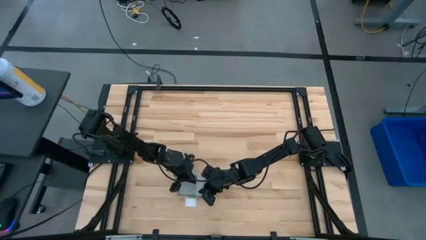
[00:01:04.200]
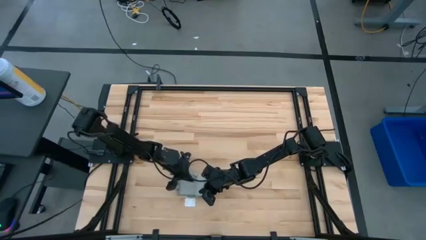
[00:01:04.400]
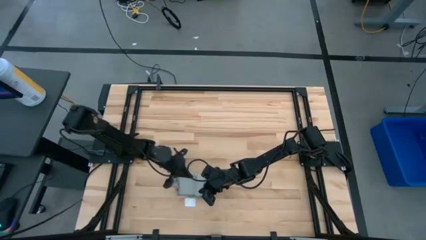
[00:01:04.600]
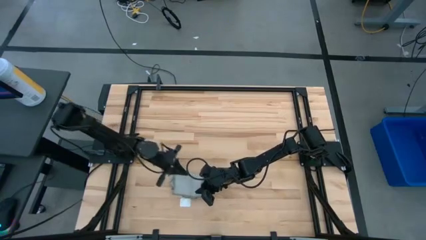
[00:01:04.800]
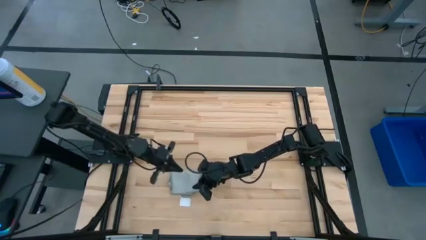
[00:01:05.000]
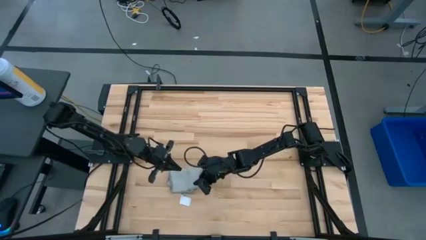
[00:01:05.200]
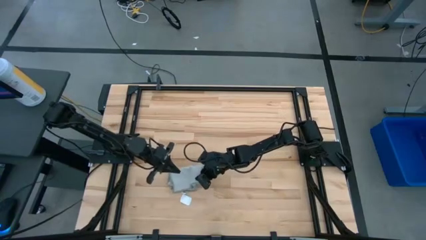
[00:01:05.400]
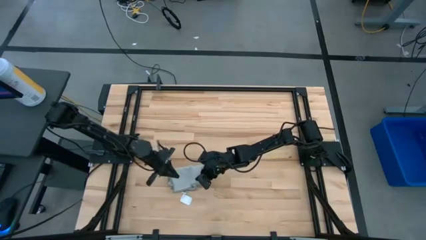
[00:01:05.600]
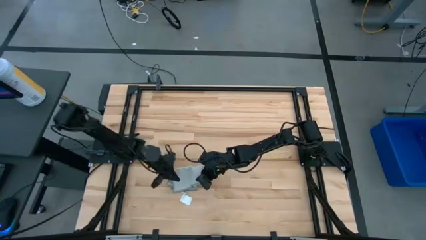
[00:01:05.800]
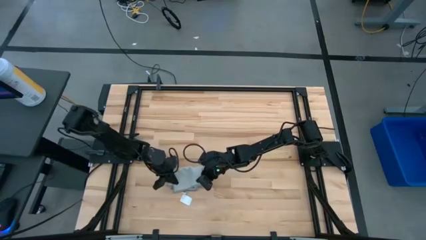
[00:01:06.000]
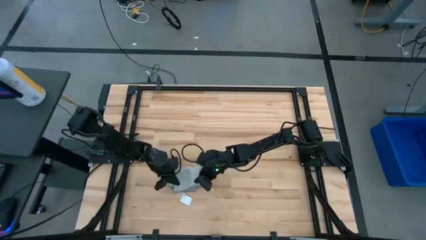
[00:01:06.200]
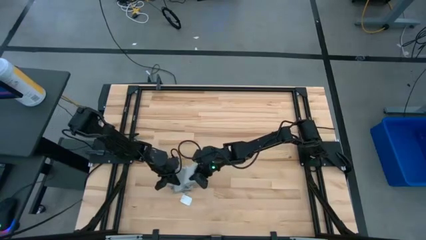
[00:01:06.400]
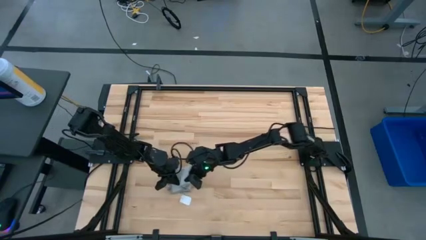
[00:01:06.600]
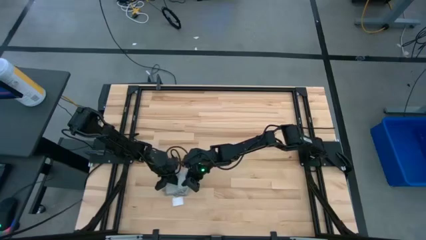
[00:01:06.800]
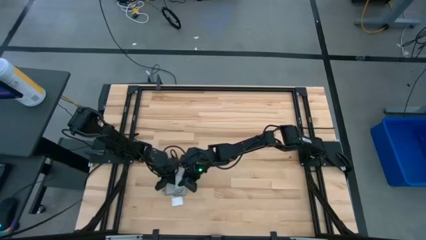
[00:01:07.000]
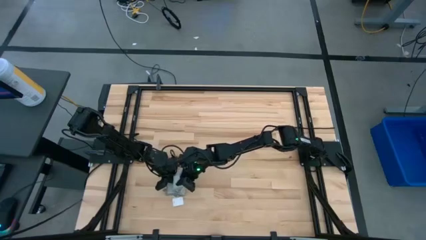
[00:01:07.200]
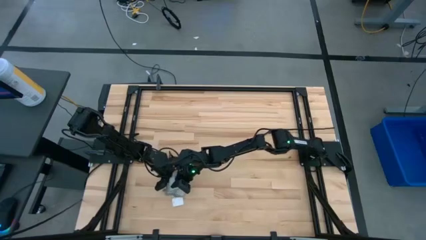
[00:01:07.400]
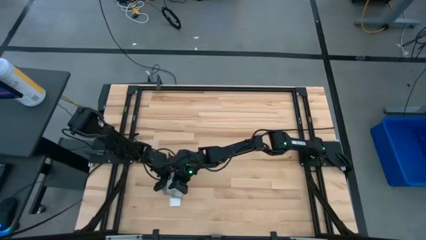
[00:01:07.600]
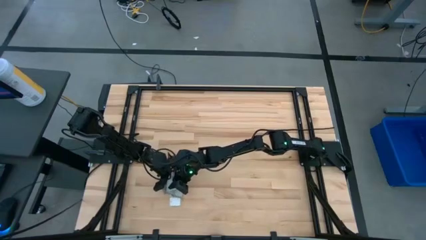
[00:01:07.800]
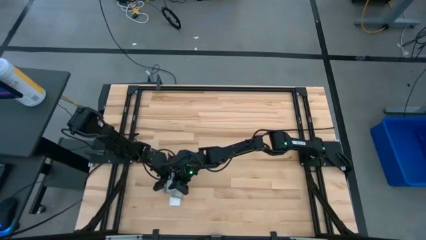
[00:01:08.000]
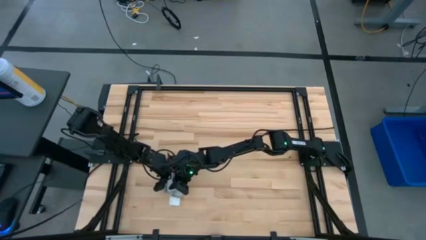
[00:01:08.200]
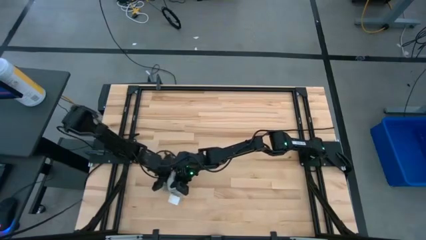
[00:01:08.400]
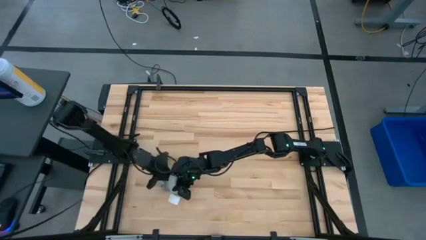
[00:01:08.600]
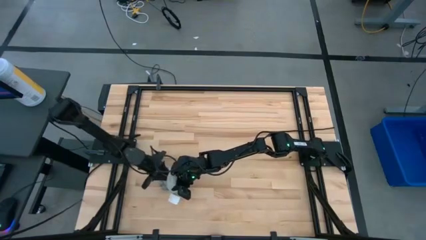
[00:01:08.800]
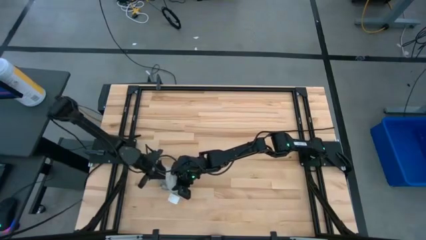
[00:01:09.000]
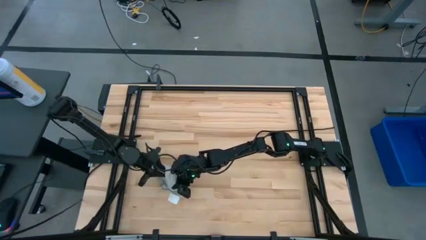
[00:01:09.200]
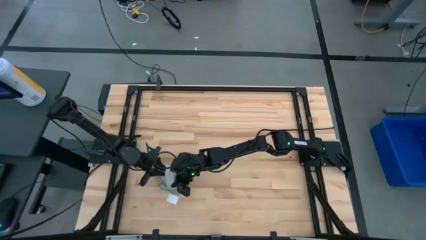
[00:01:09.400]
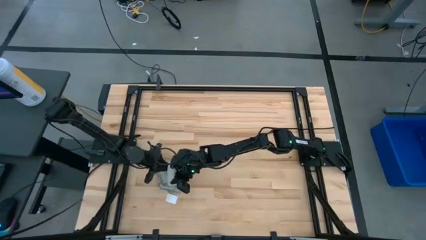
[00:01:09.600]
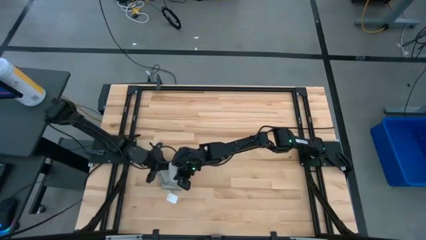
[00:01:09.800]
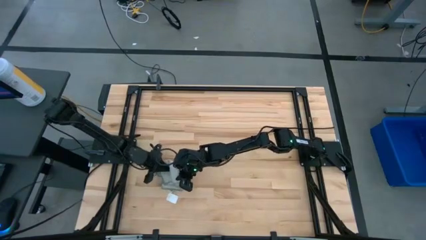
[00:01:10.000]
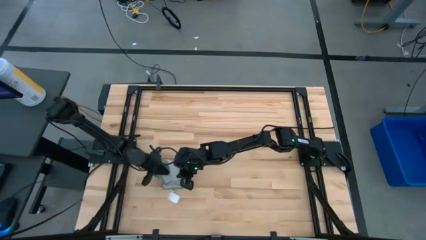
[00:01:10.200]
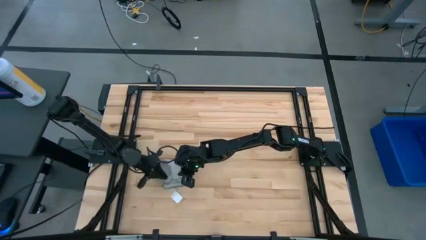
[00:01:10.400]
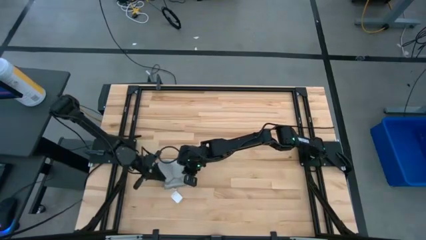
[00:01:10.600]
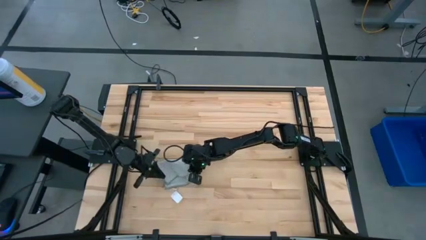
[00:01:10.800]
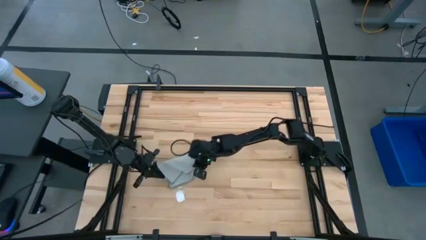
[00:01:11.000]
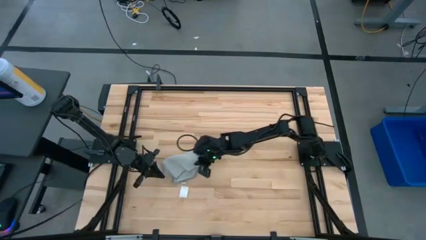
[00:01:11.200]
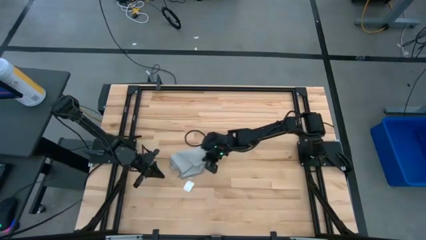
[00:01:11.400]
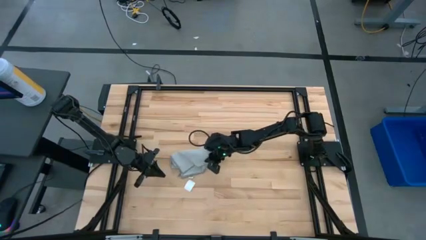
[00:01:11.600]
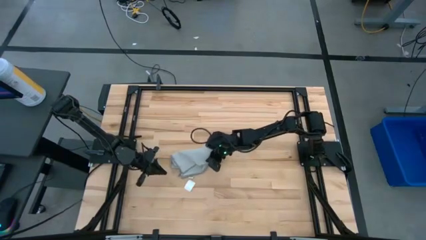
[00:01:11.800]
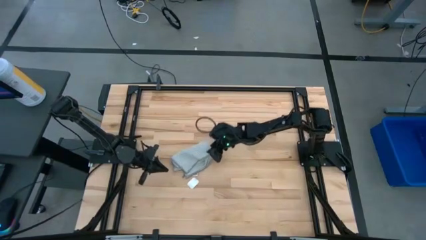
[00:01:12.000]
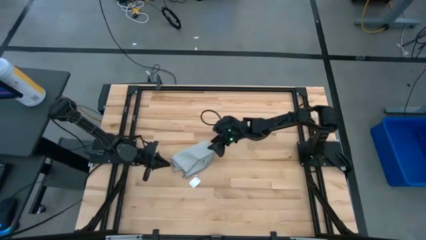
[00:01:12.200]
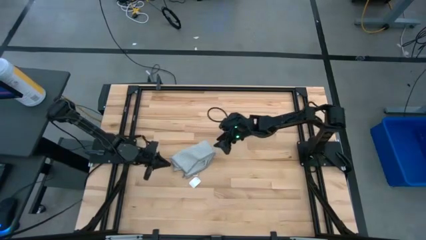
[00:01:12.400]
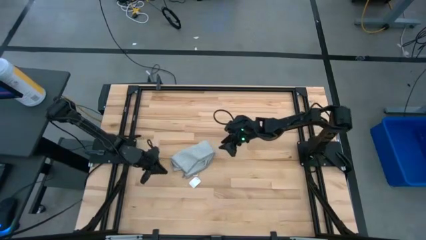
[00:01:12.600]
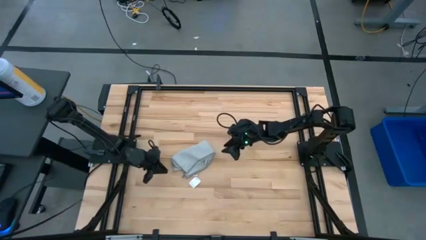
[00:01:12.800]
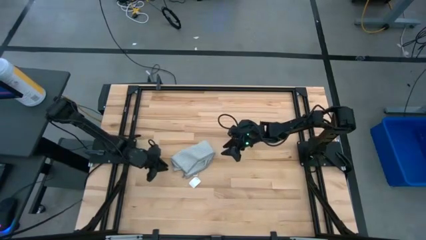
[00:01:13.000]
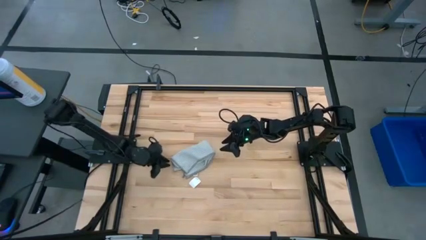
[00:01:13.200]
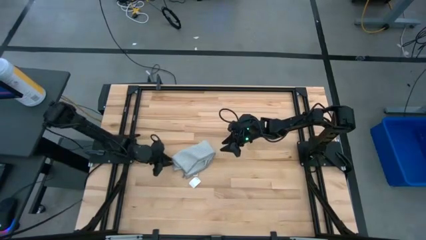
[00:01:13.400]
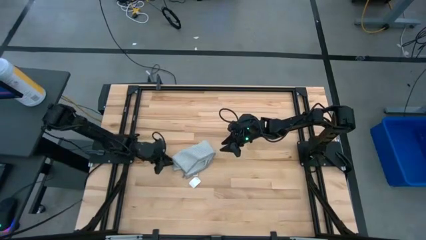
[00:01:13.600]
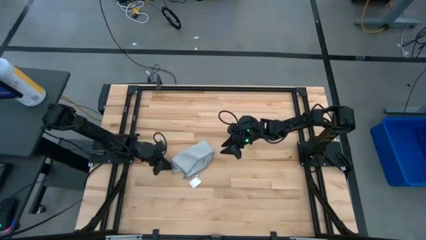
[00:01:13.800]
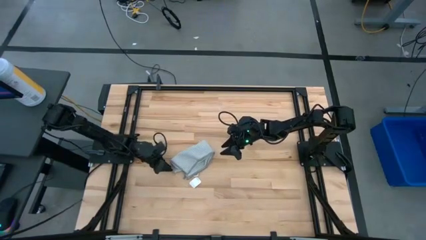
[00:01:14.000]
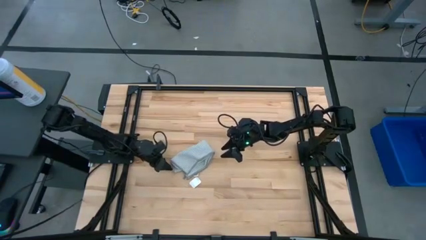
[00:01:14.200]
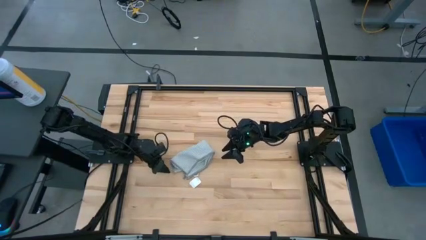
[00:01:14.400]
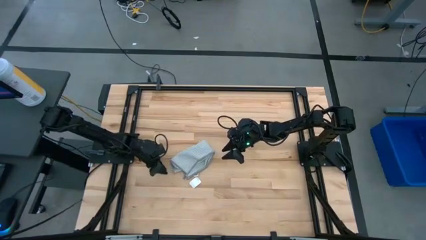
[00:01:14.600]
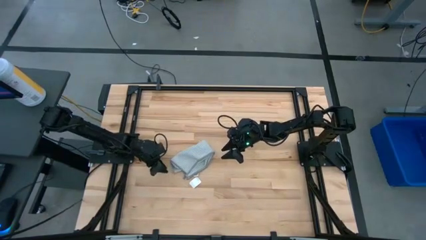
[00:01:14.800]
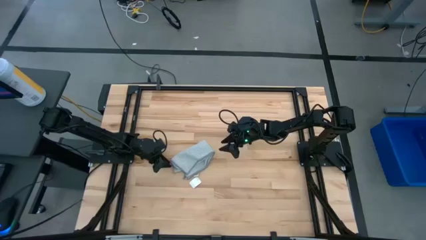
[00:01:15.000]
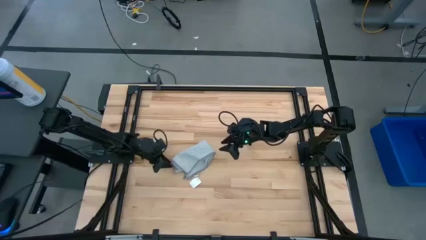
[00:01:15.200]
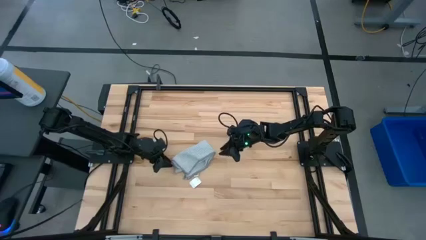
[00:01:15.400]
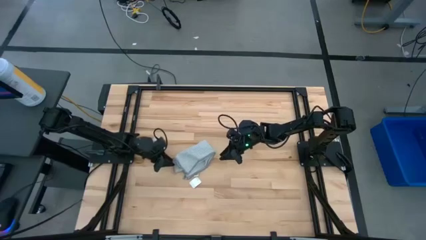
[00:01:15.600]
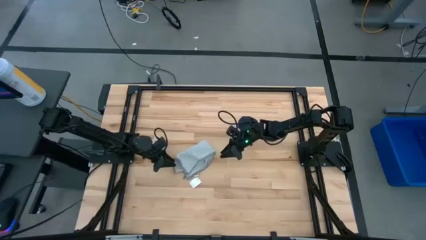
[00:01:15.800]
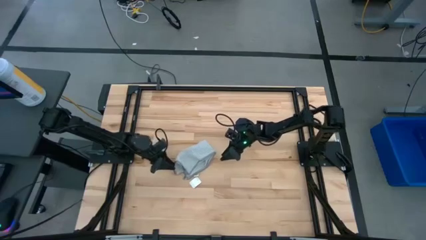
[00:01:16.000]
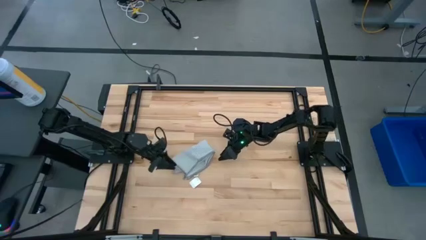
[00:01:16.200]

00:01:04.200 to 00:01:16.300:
Task: Fold microfiber towels
Fold the gray towel
